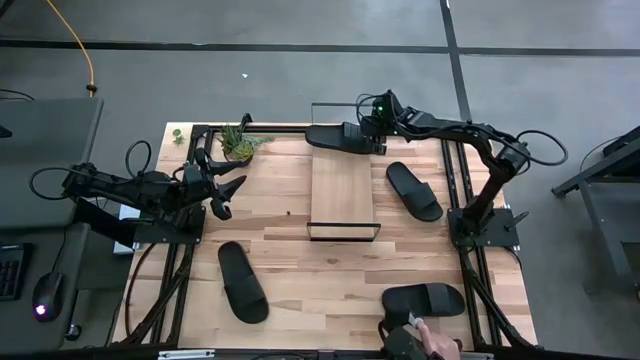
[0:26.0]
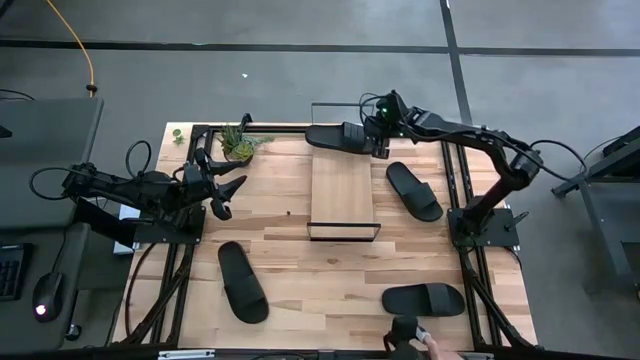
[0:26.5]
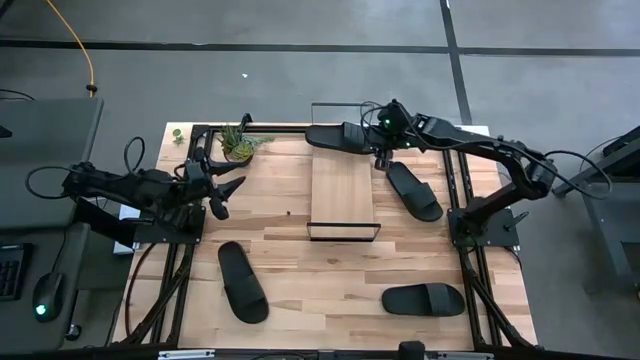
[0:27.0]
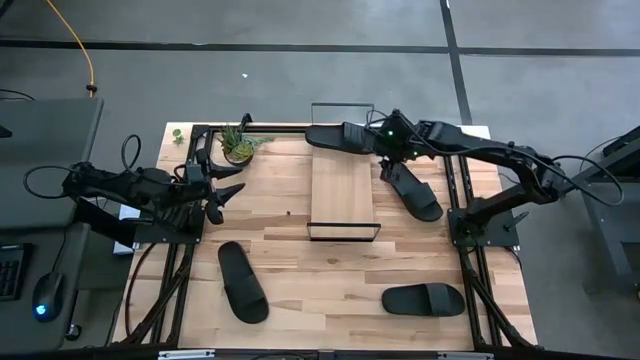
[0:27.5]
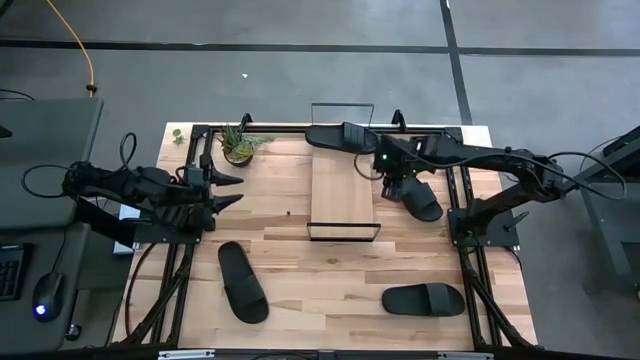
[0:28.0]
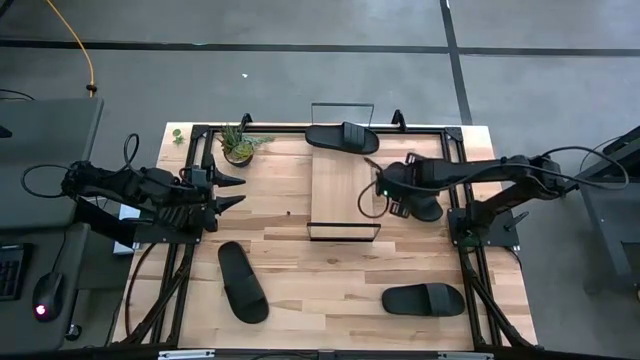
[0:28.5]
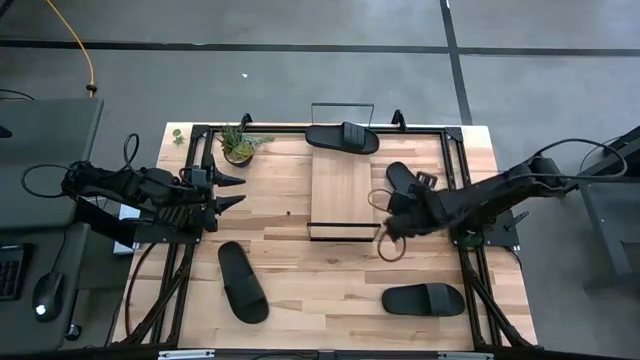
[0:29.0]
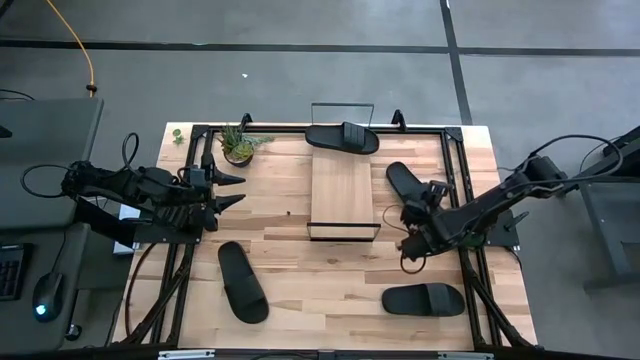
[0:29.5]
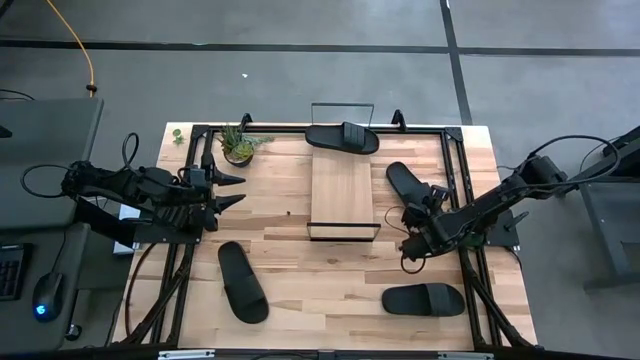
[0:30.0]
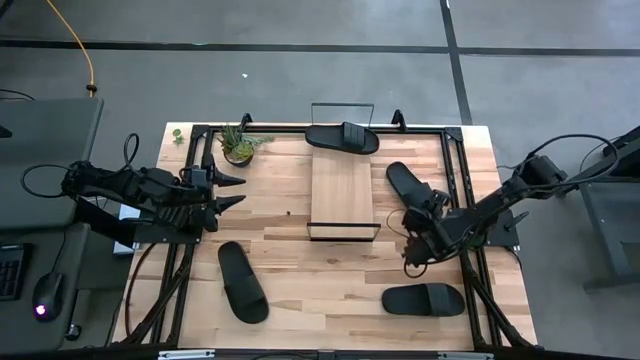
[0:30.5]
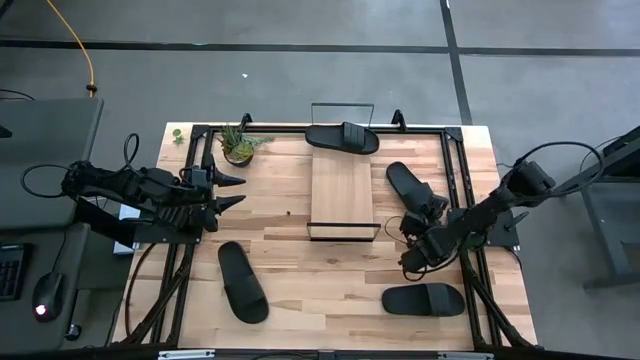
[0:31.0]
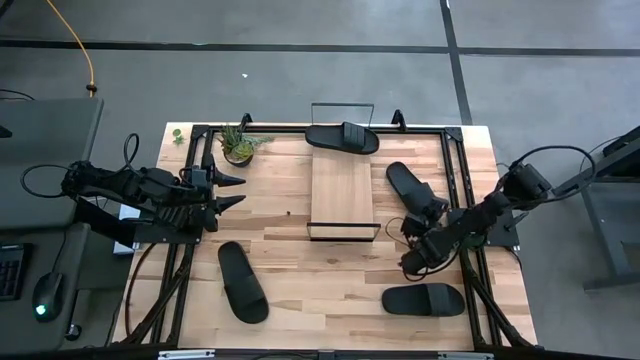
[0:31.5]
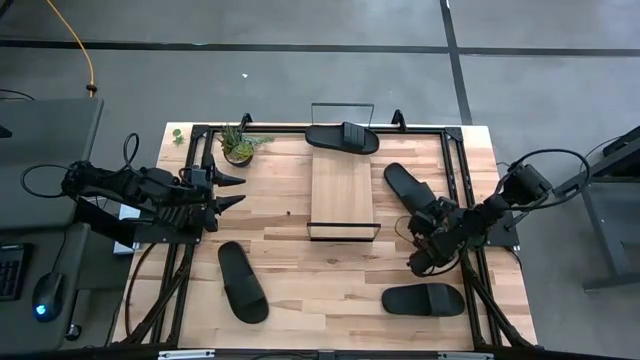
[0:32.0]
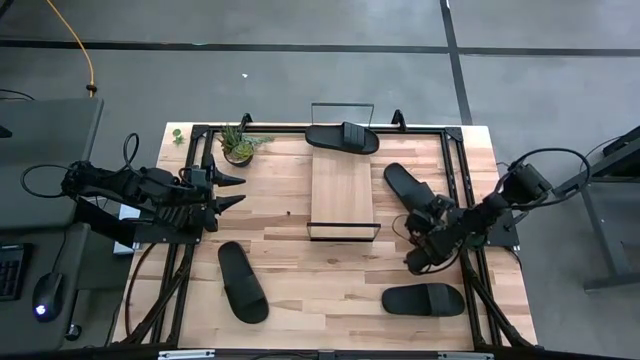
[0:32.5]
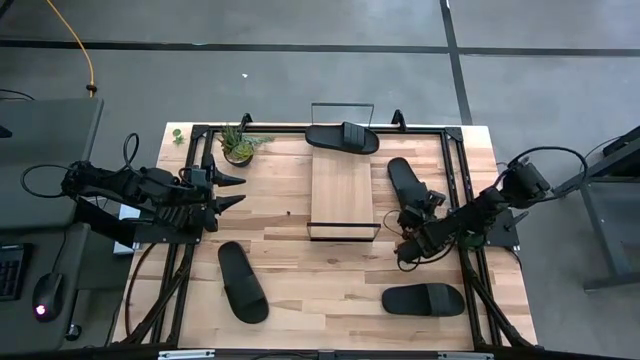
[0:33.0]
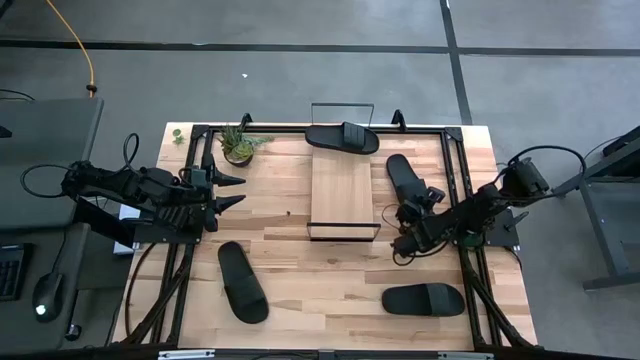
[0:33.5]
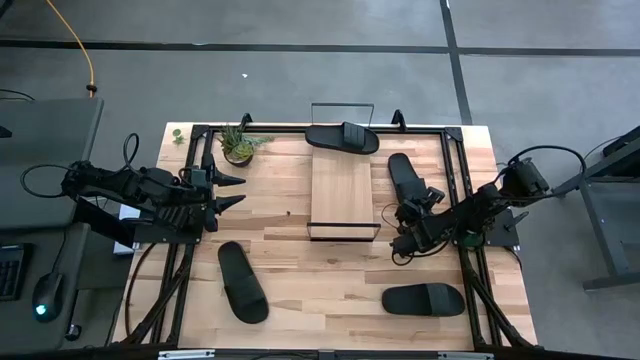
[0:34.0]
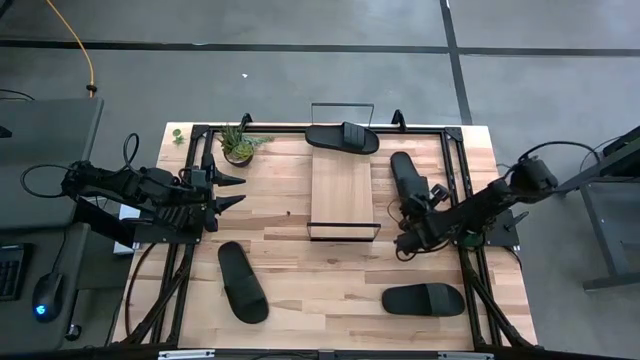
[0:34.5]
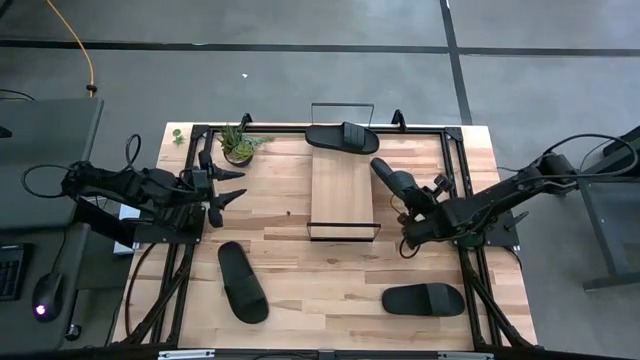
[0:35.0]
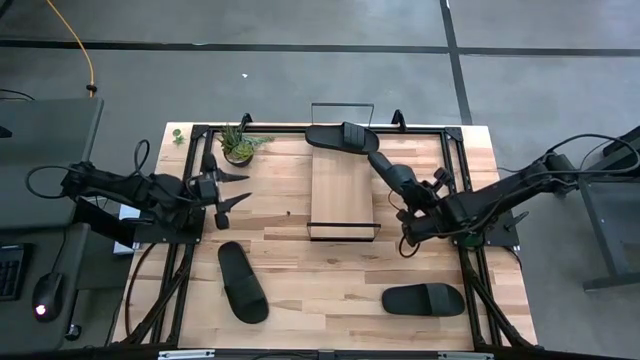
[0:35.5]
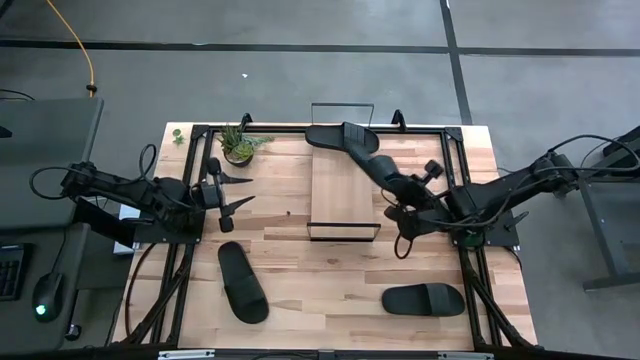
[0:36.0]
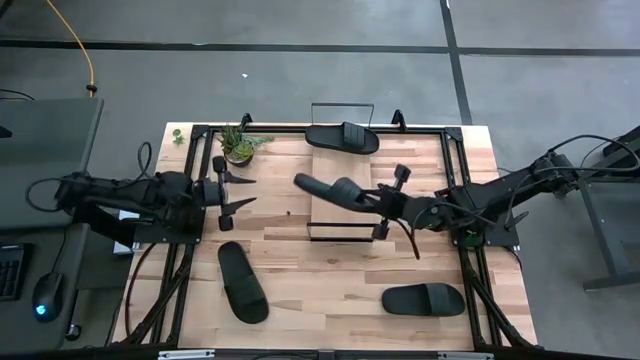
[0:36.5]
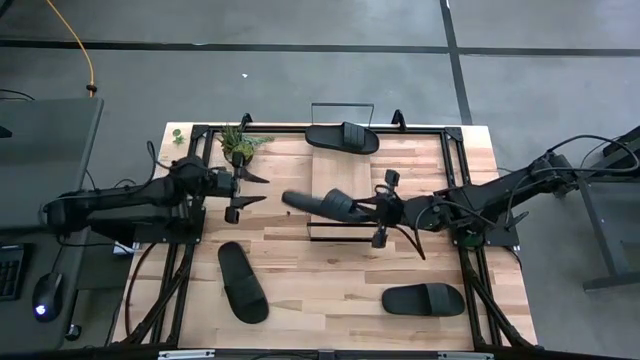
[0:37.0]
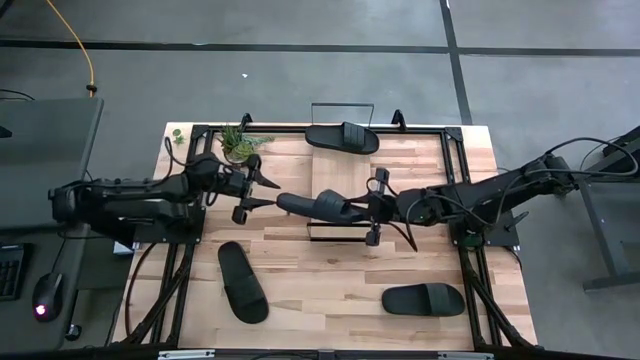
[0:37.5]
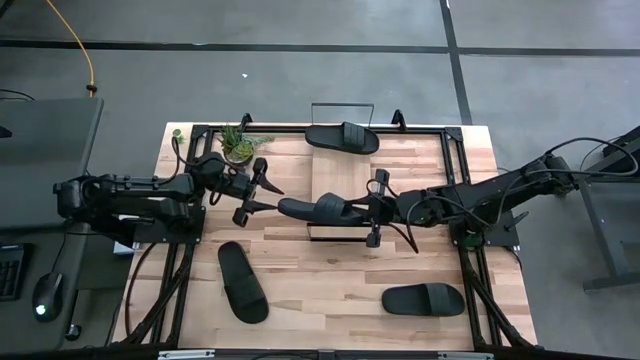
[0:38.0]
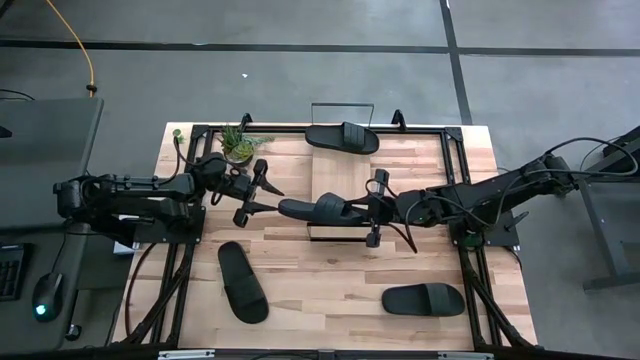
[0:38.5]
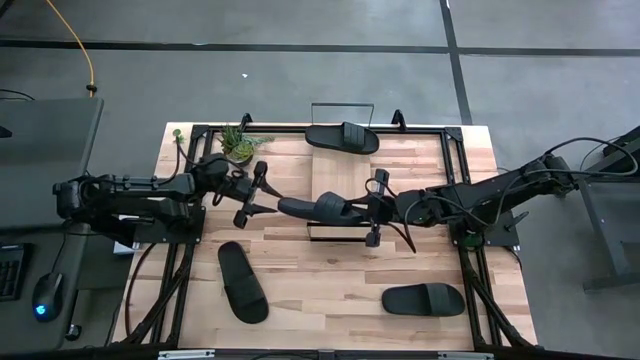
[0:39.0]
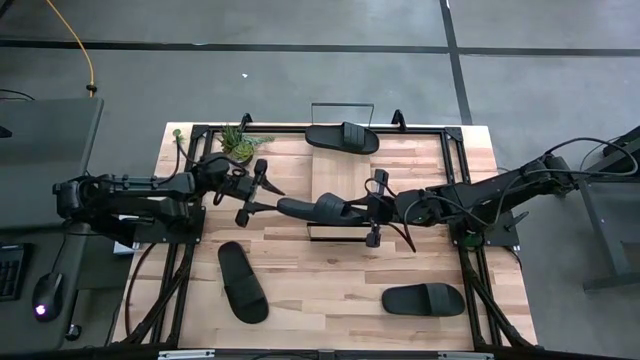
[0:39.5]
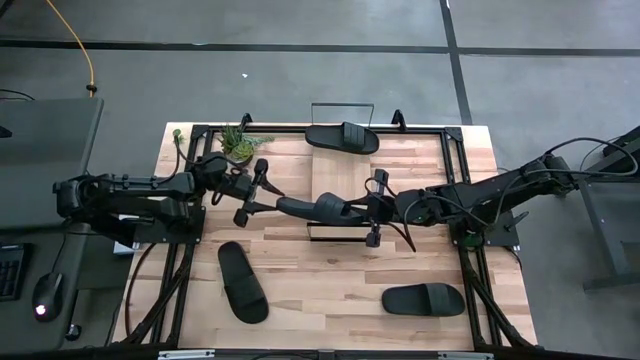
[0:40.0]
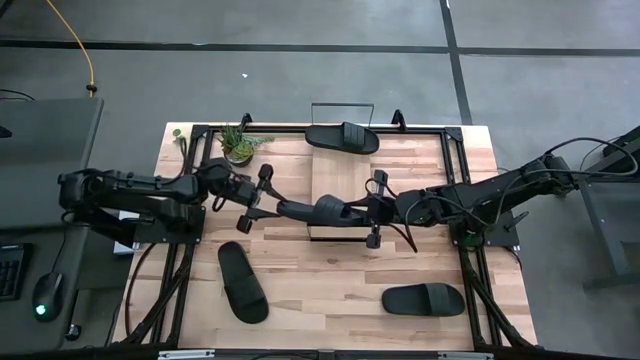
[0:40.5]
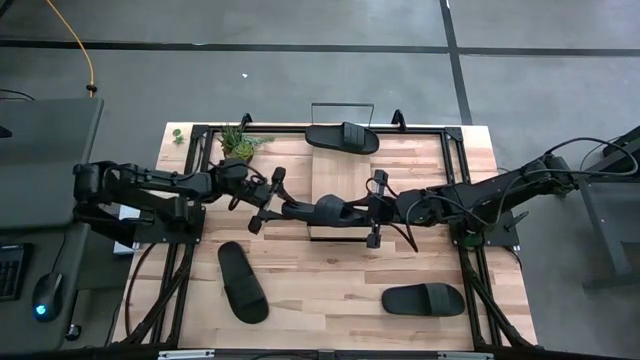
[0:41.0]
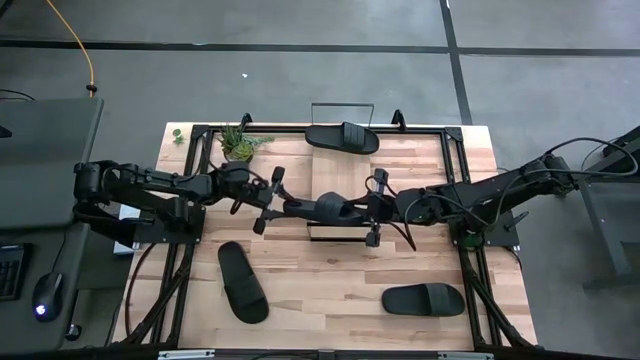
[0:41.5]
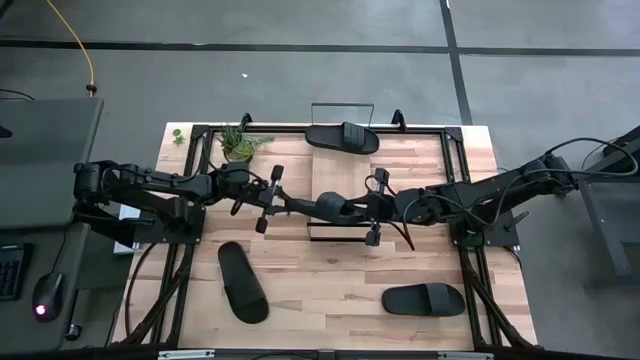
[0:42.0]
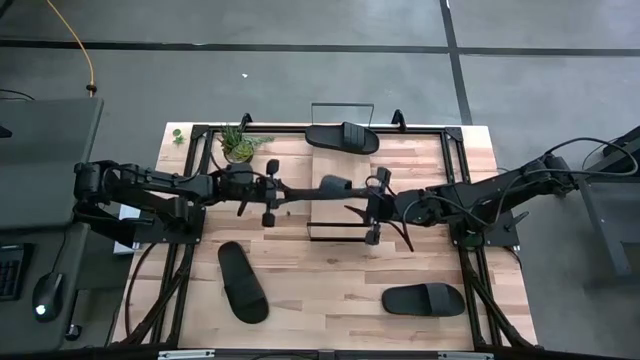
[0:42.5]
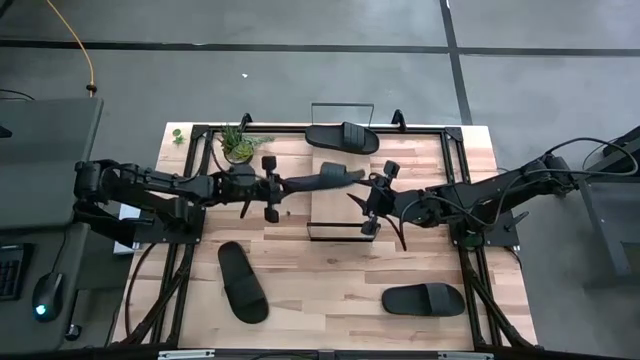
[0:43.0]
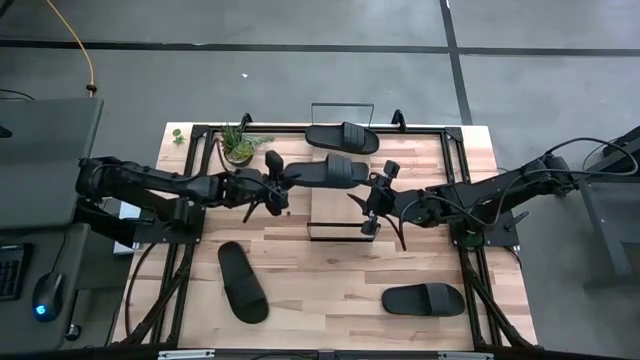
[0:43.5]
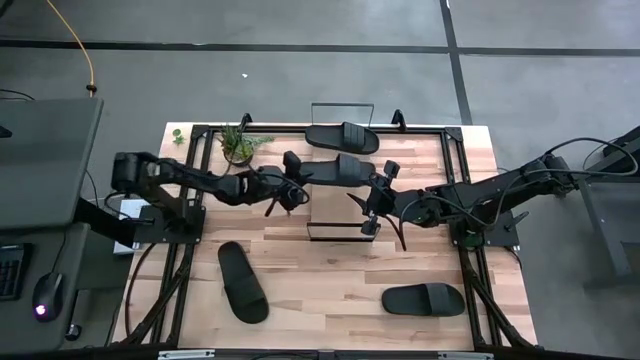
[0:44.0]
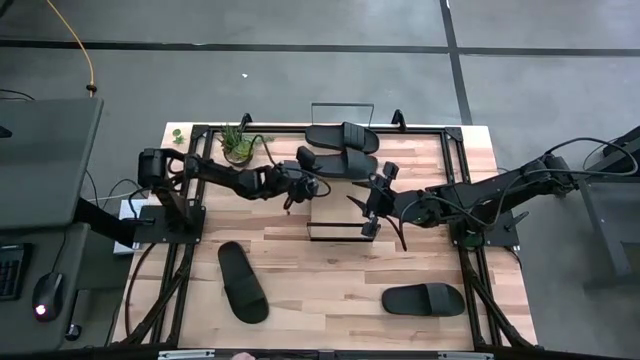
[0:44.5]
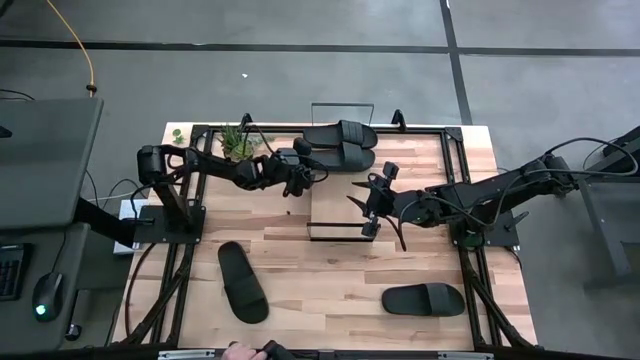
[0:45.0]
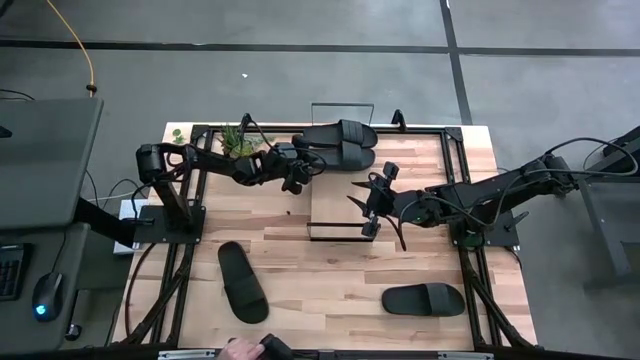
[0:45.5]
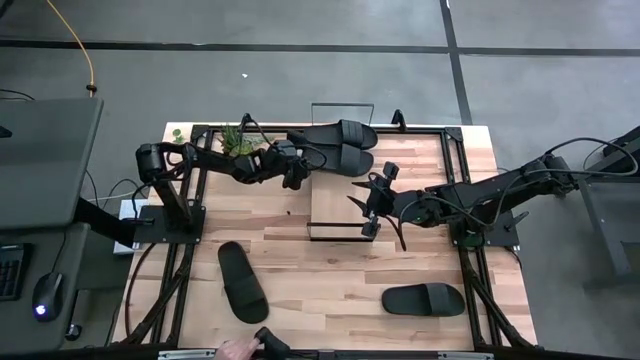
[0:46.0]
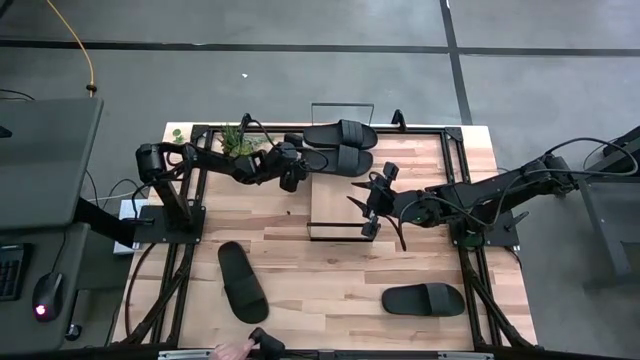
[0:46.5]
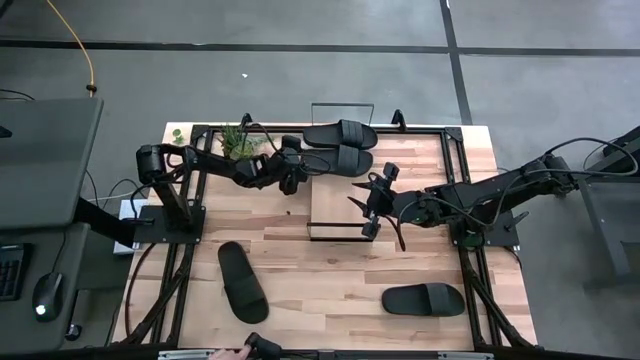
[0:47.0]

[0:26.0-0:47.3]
Task: Pick and place slides into the shelf
Put the top right black slide on the shelf
